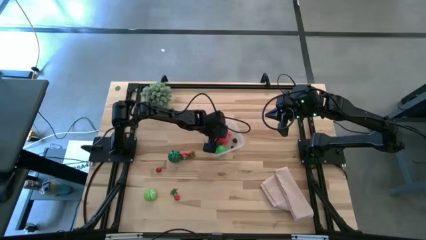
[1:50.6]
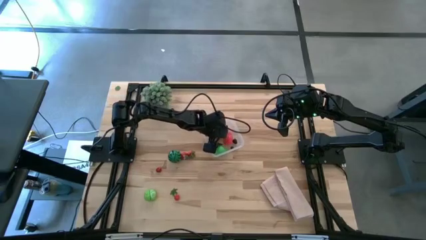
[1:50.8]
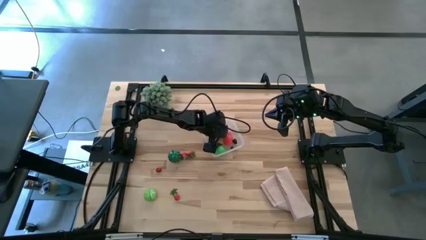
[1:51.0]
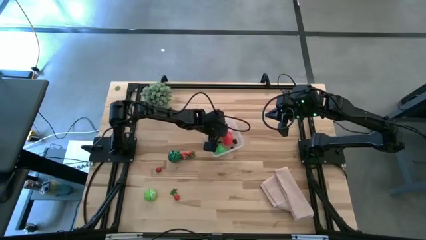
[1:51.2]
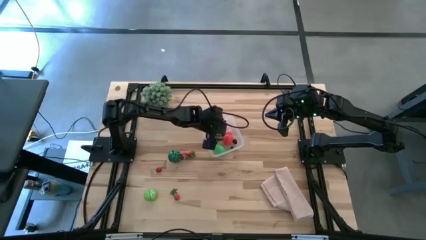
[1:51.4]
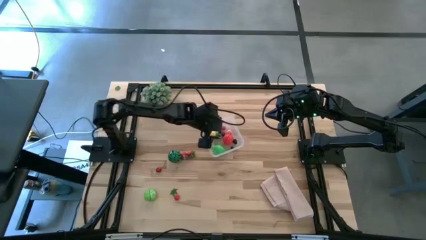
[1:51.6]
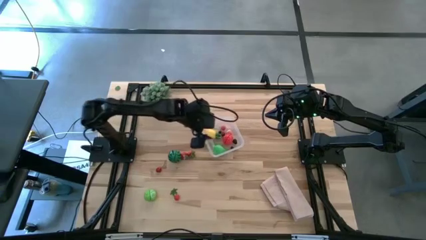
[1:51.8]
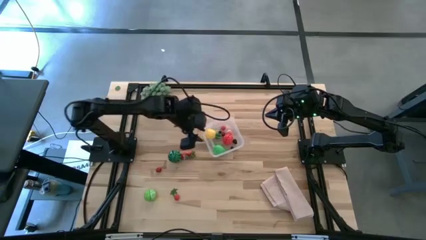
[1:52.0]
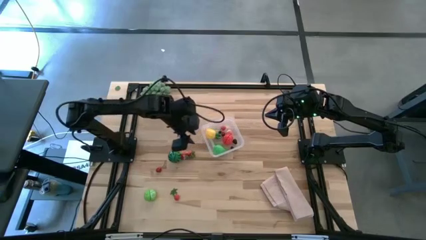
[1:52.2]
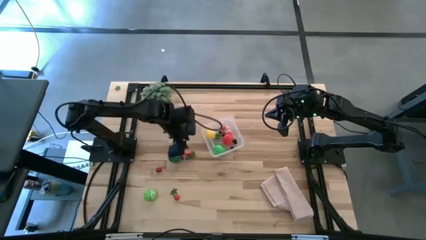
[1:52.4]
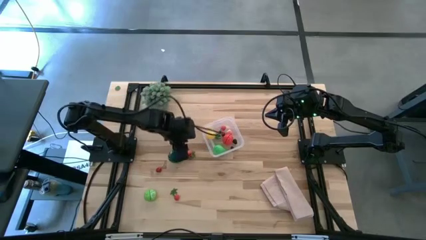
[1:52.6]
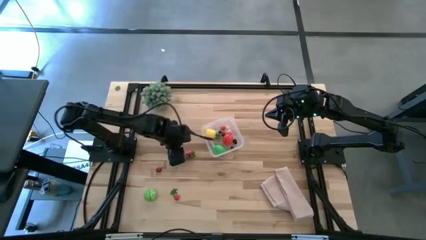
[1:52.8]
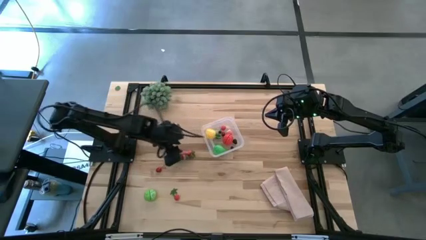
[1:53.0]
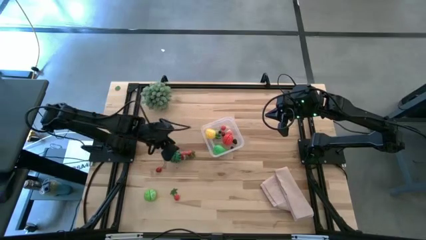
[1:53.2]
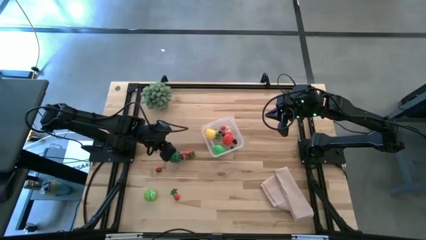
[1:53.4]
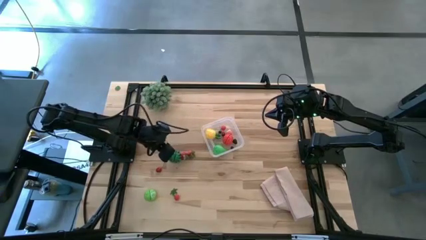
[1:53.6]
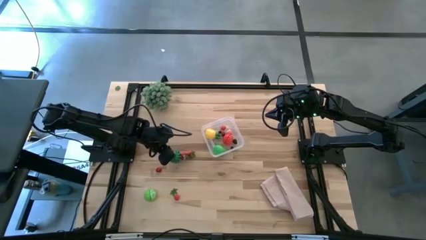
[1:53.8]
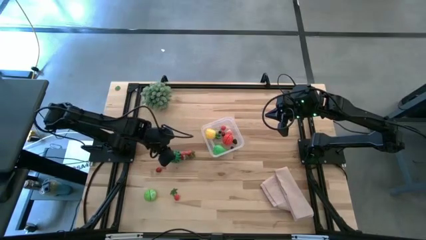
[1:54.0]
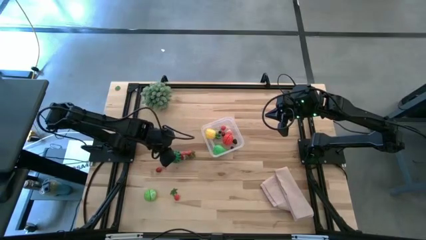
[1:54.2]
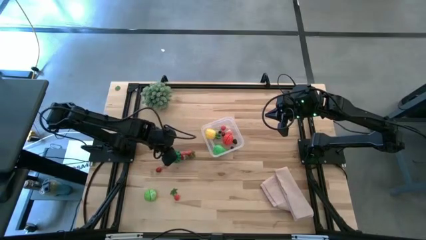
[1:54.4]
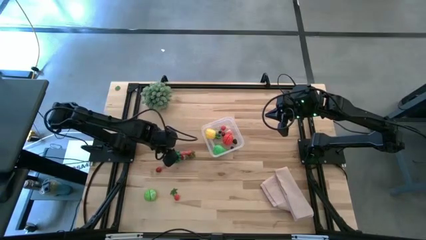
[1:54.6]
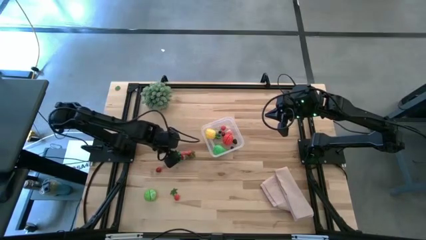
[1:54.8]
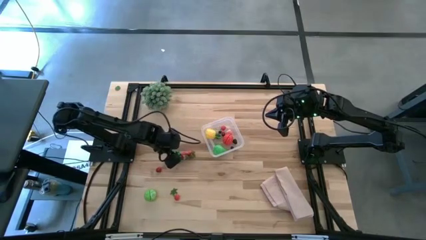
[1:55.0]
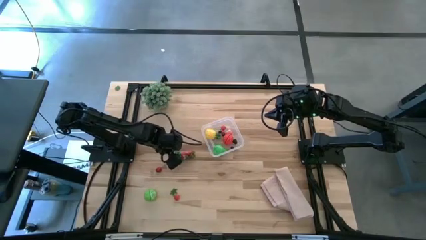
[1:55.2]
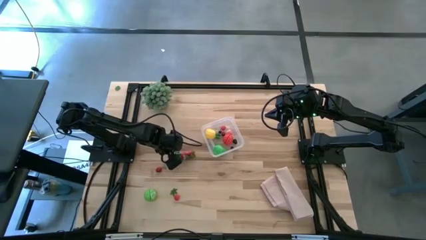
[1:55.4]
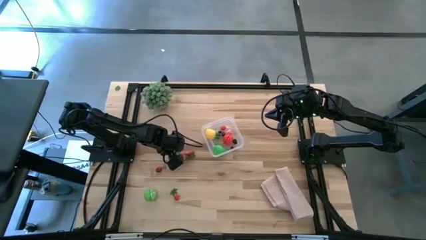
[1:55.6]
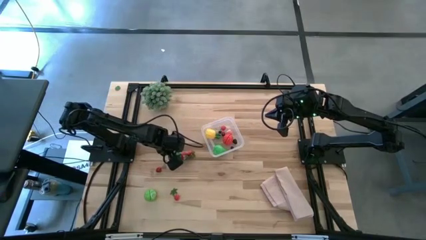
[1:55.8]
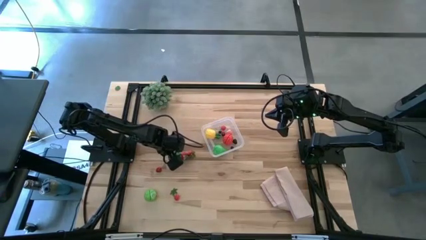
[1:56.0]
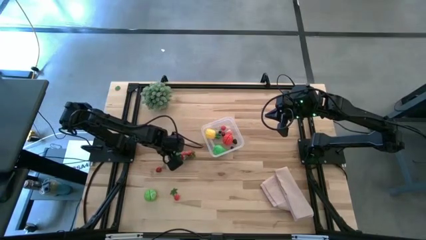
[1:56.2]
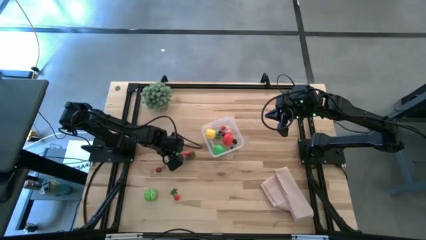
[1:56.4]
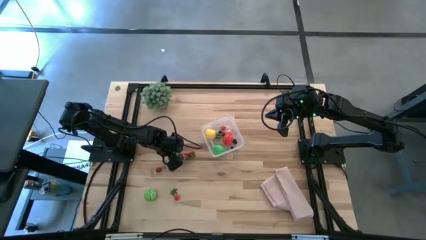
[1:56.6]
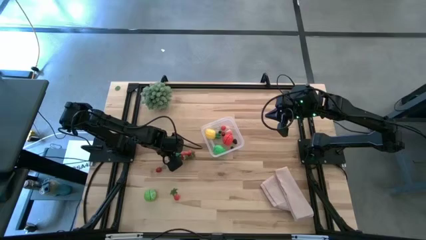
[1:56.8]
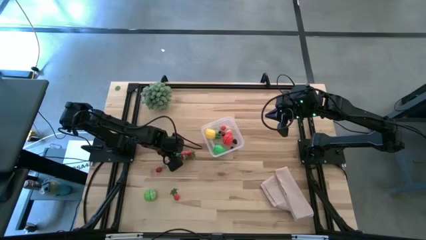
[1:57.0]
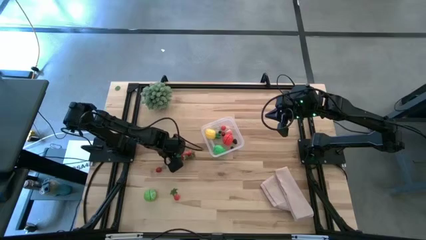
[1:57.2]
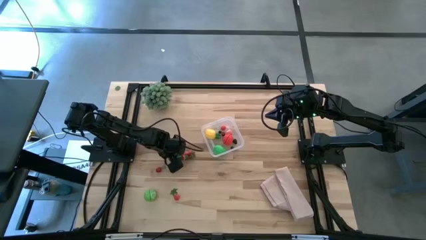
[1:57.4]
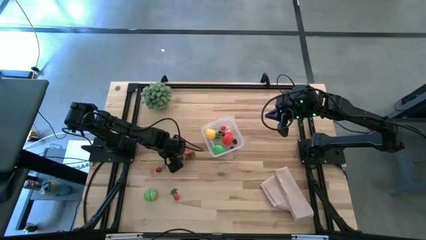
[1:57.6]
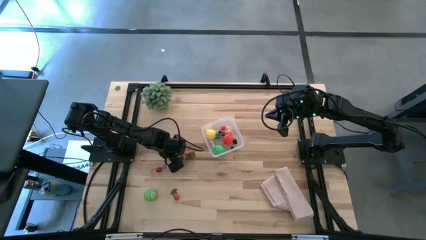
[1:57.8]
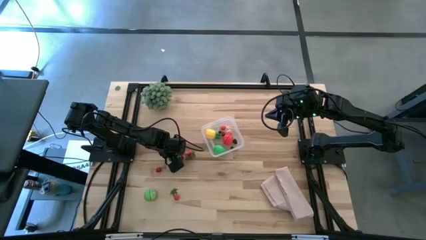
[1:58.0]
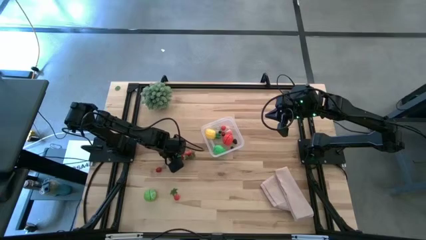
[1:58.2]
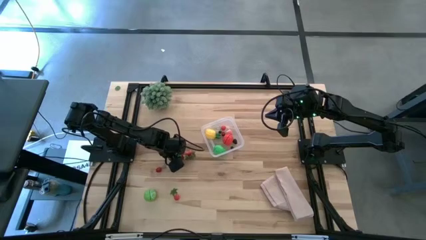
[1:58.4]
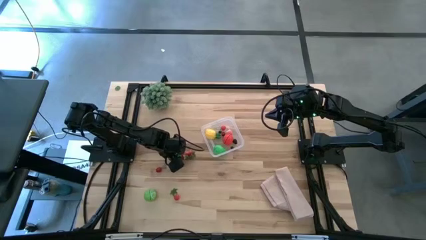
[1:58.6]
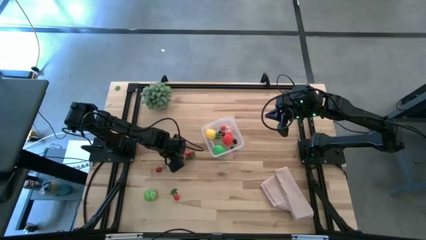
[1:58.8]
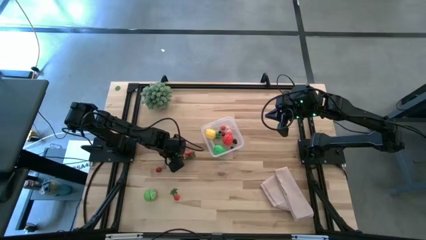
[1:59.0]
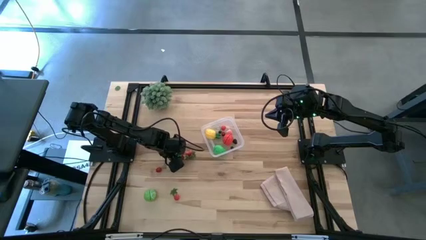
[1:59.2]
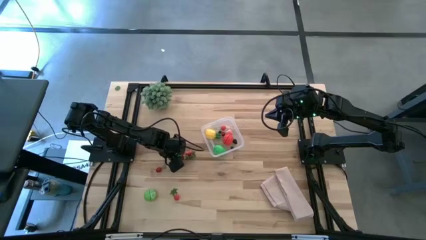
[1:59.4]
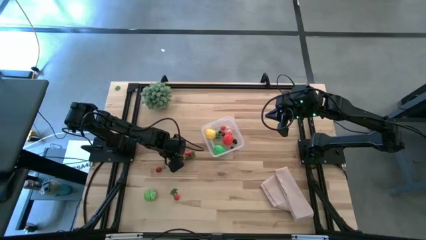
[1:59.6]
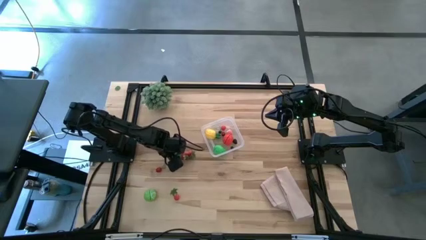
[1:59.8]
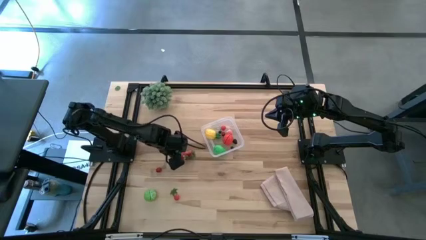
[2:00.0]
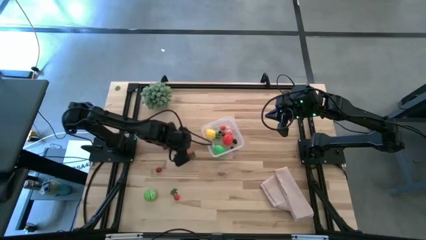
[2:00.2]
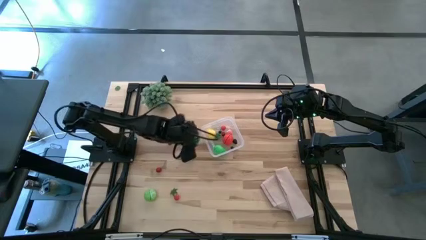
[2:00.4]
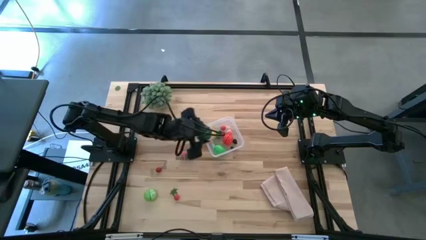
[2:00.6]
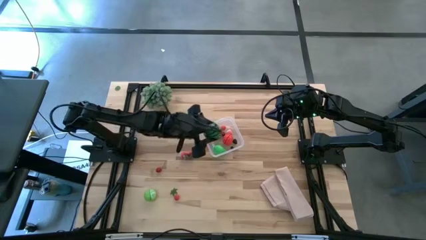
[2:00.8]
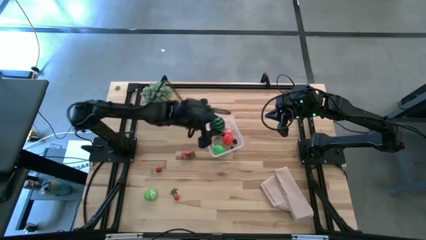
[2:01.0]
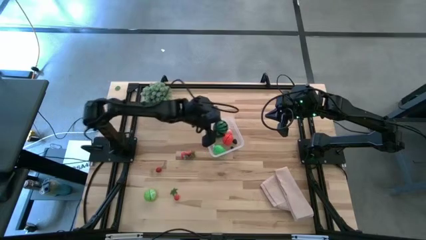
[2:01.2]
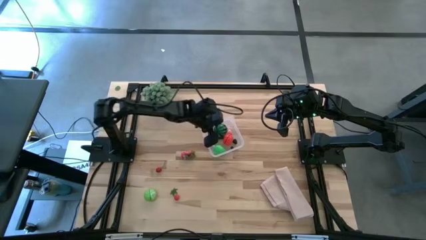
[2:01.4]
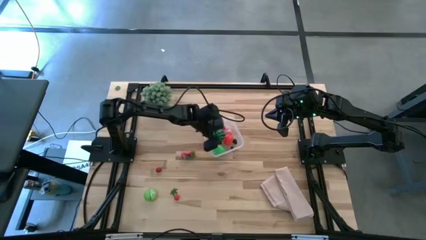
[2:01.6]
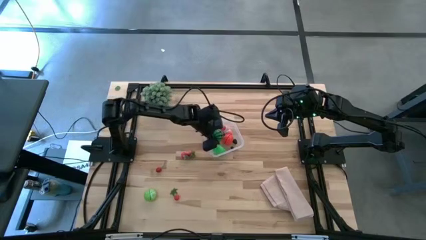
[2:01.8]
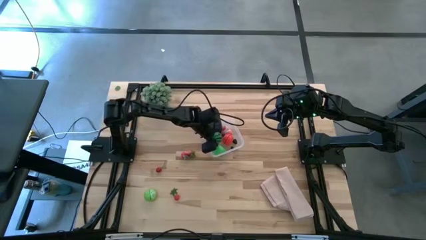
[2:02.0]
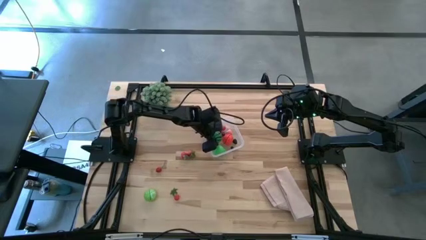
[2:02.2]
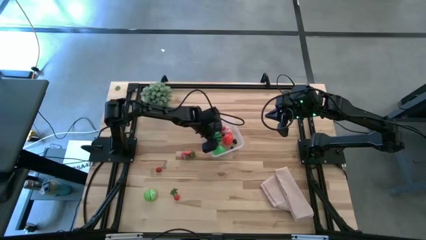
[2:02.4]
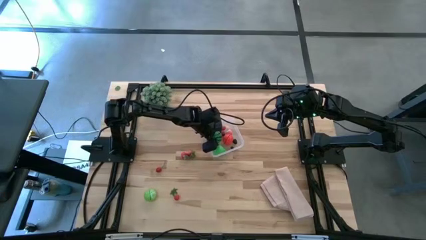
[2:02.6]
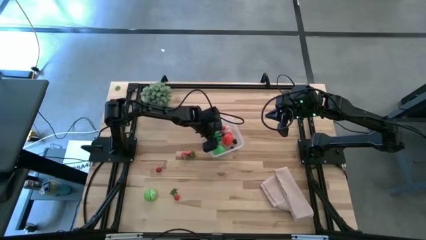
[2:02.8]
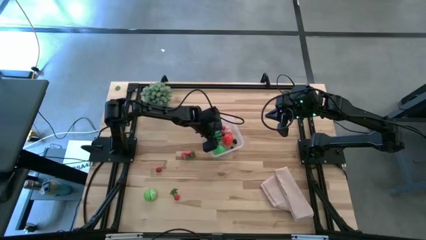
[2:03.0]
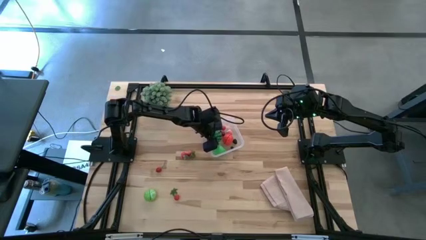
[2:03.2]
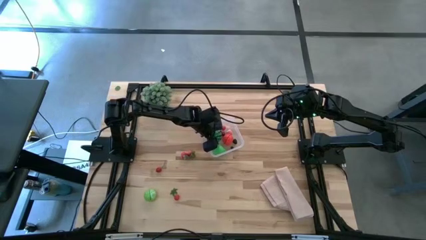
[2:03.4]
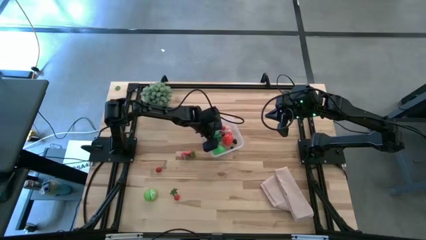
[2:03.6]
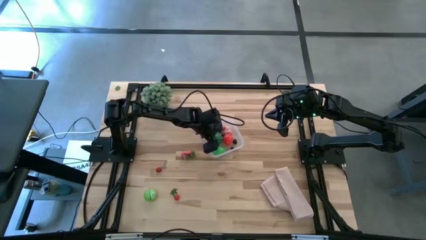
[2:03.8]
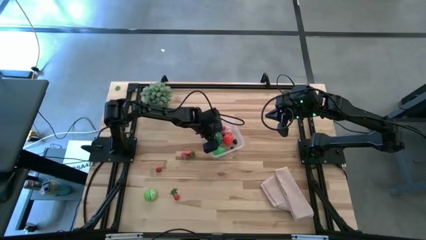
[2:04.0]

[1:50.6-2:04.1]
Task: Pick and placing Produce into tupperware
Put the green watermelon into the transparent bin

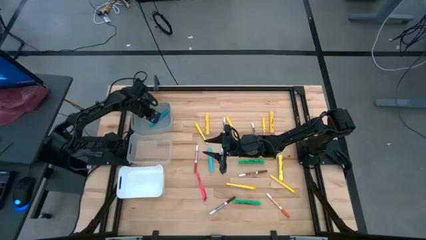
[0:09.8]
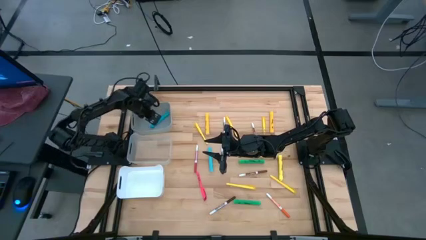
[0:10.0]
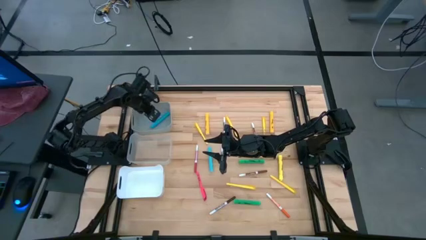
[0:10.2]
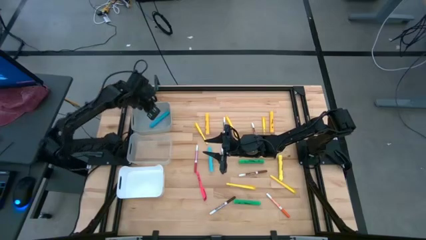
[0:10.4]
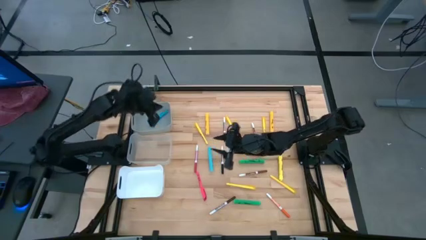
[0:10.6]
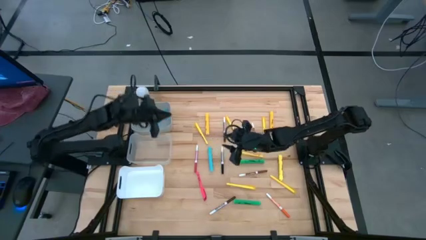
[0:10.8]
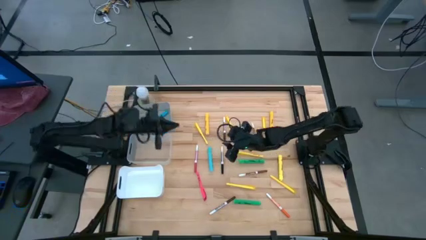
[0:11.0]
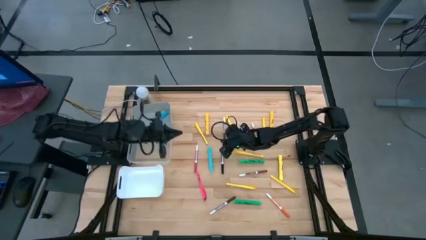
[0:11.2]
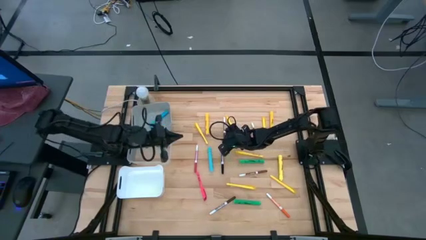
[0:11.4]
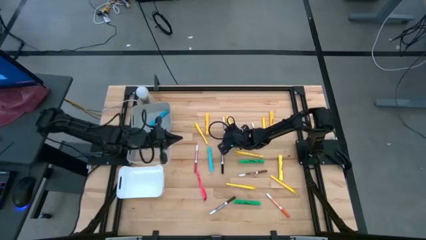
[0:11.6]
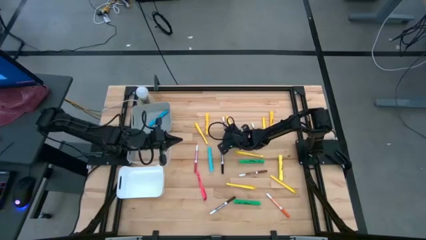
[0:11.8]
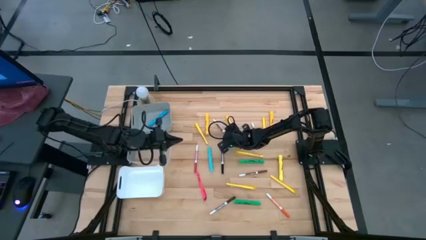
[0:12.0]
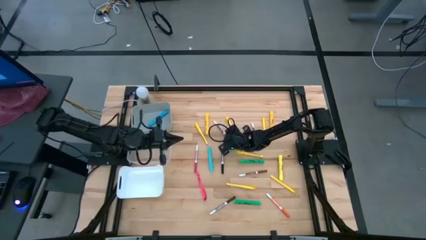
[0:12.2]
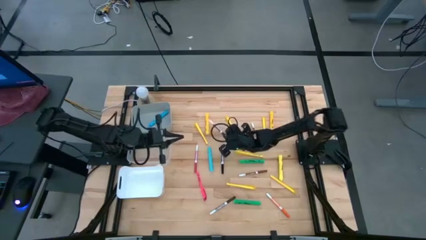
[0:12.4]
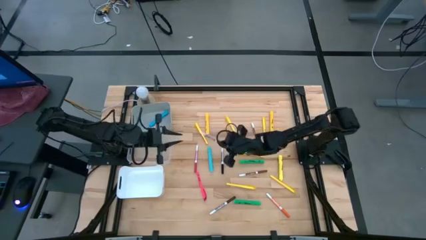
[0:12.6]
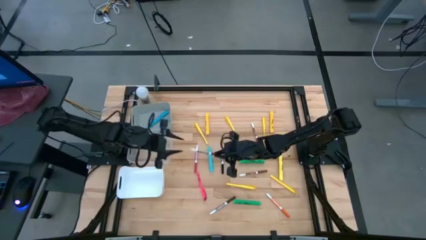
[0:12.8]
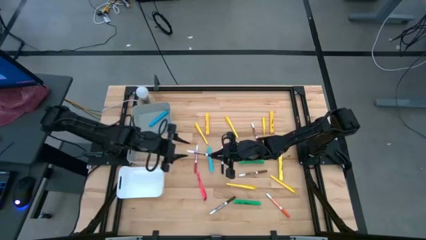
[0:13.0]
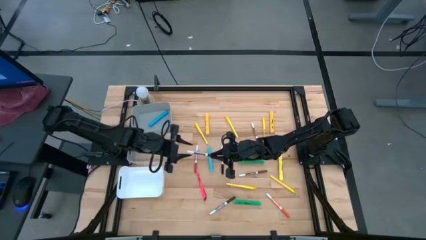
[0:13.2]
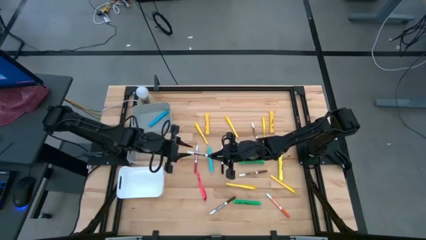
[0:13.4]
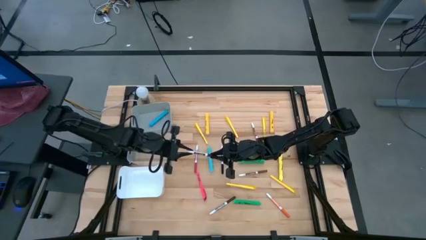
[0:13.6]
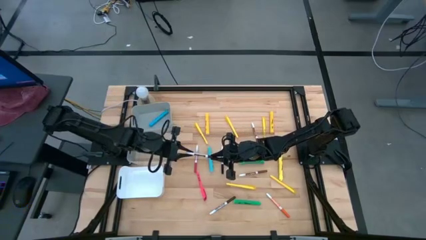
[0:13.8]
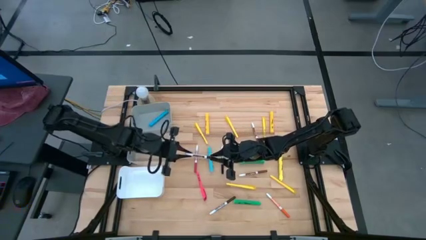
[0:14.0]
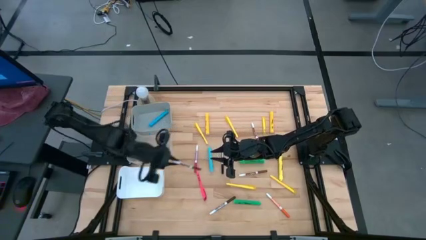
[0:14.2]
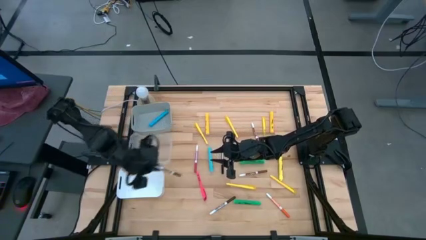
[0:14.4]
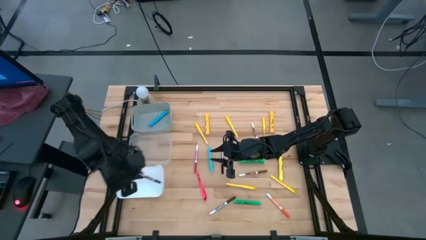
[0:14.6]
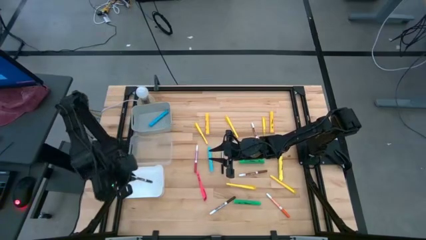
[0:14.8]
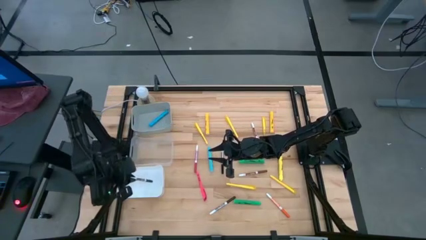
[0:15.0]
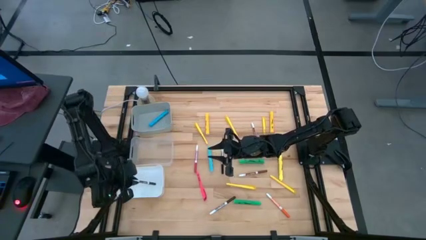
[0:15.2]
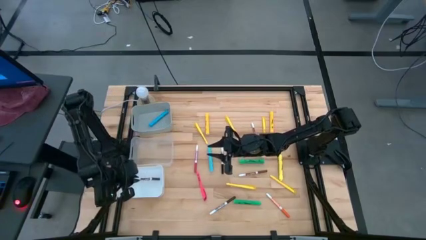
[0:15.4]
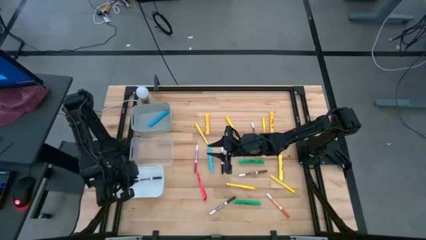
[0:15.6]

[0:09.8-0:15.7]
Task: Pick & Place Markers
Put the brown marker into the white bin
